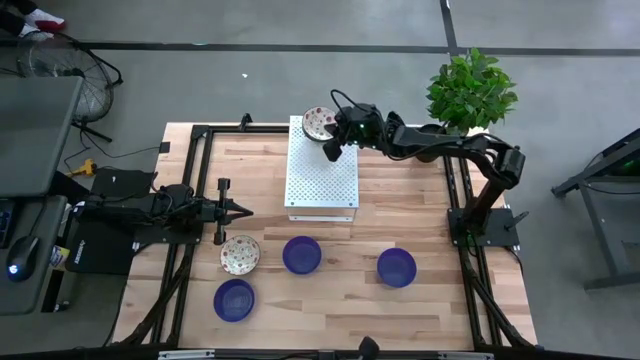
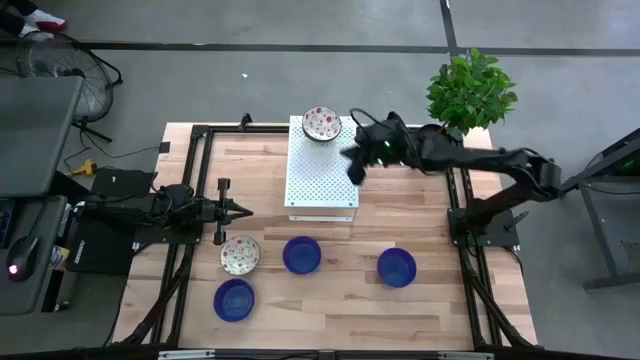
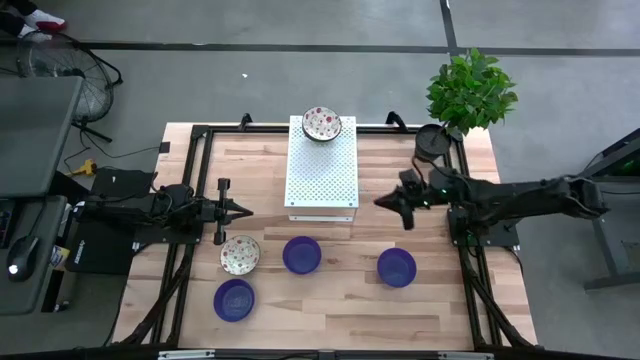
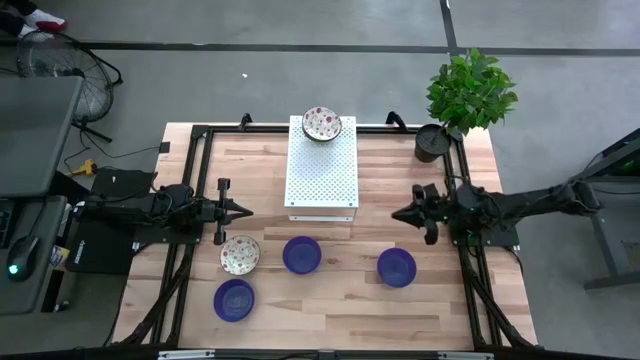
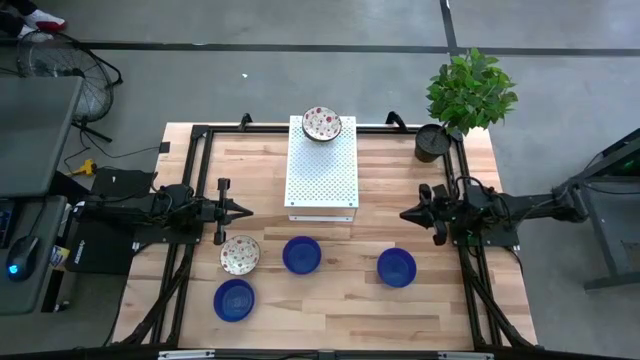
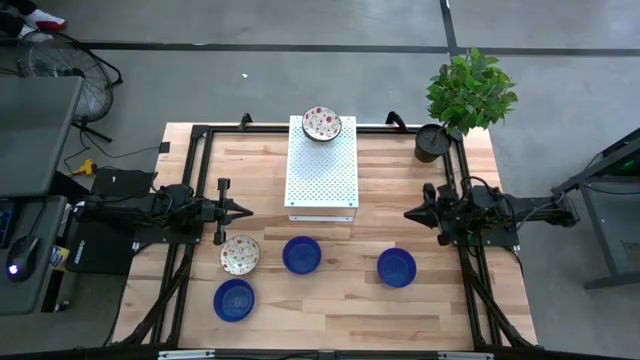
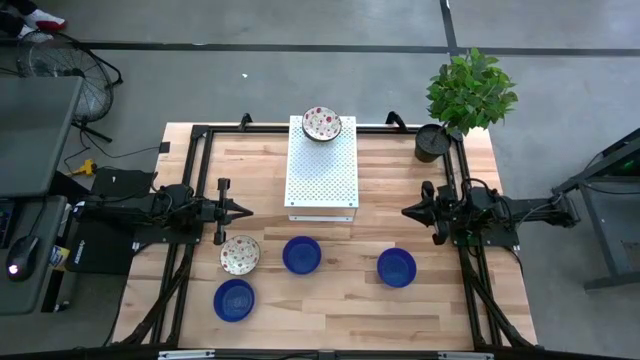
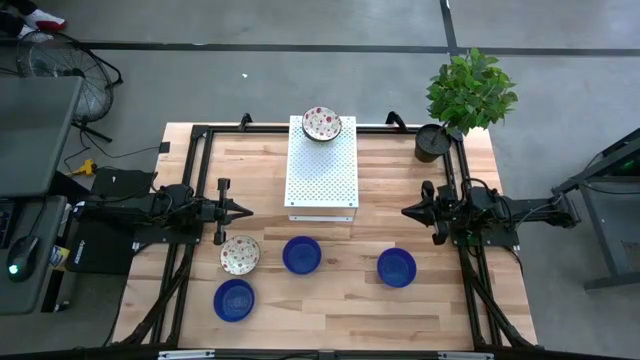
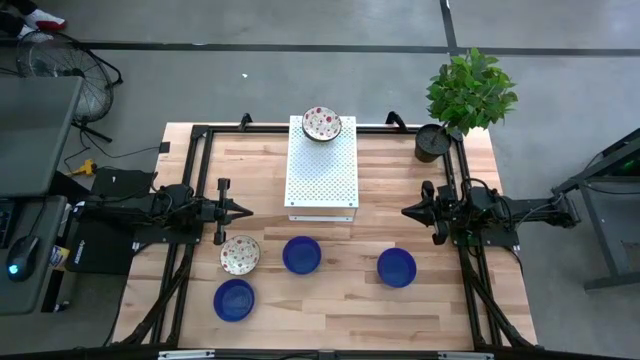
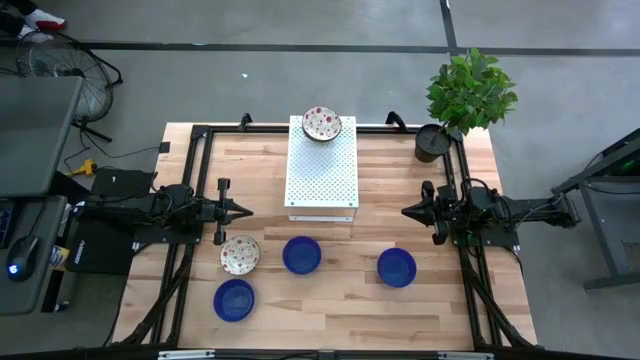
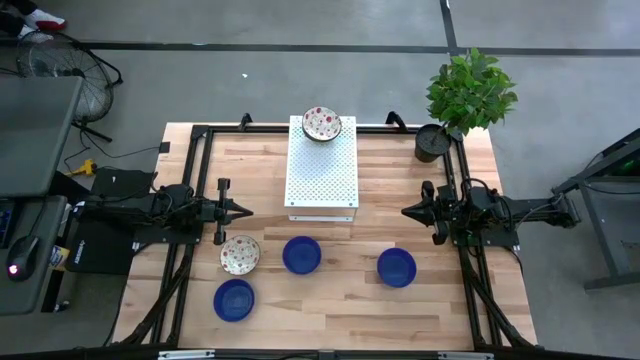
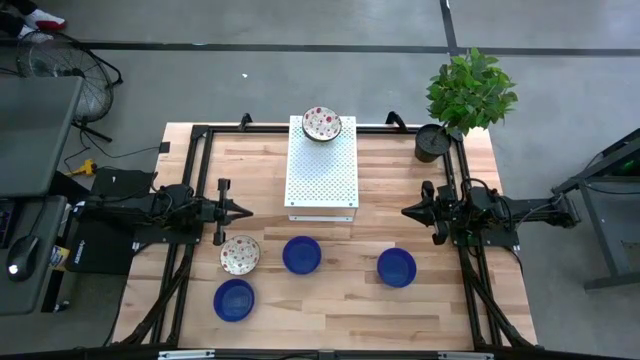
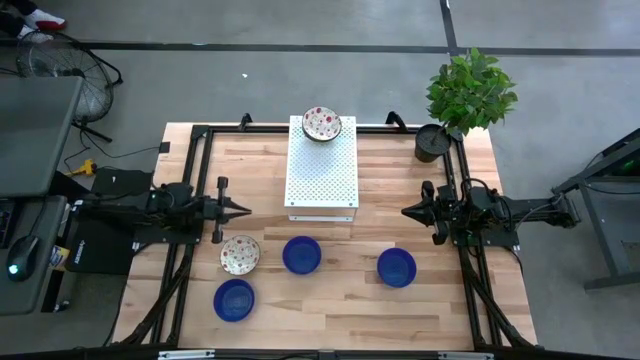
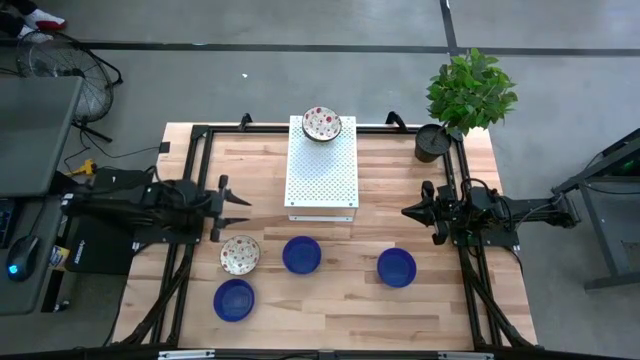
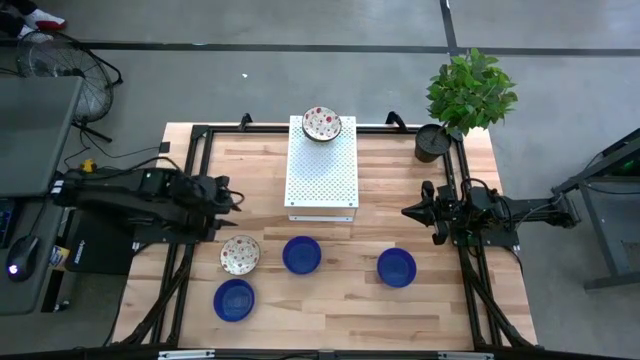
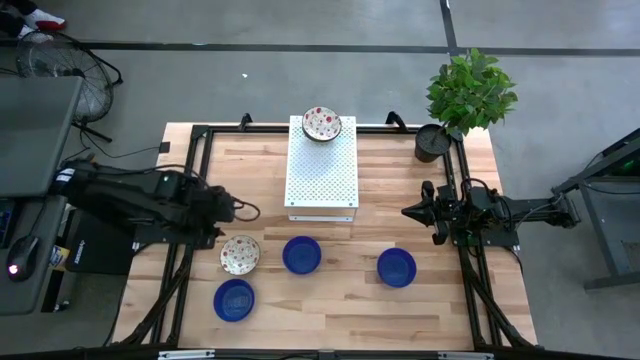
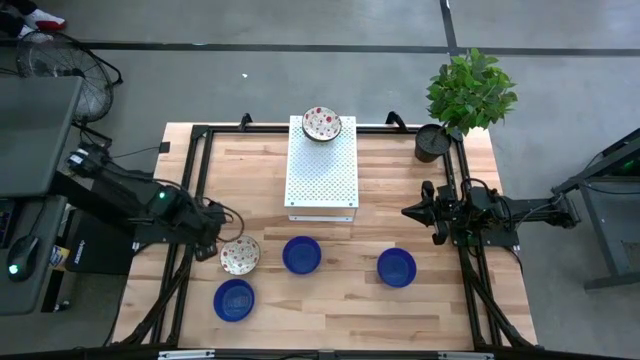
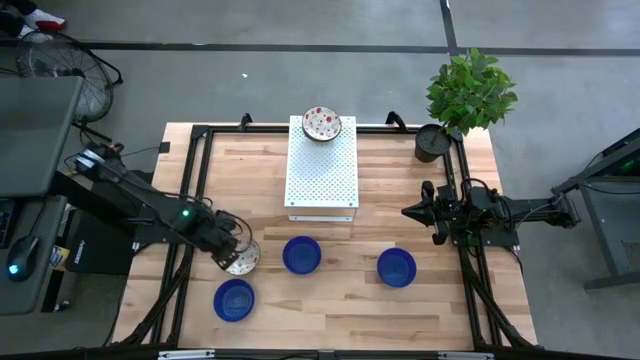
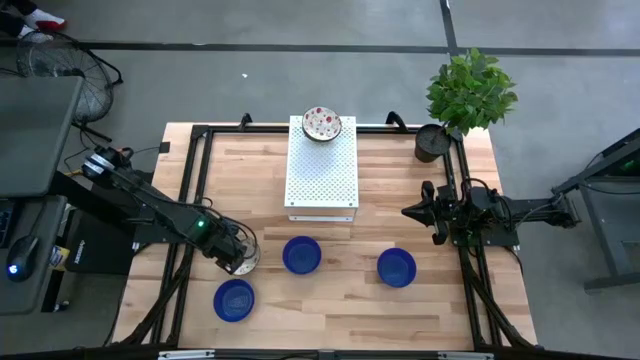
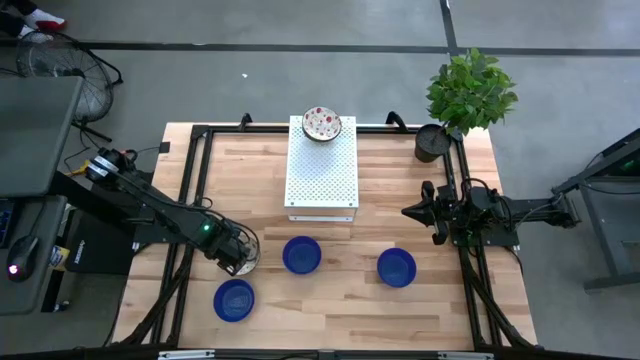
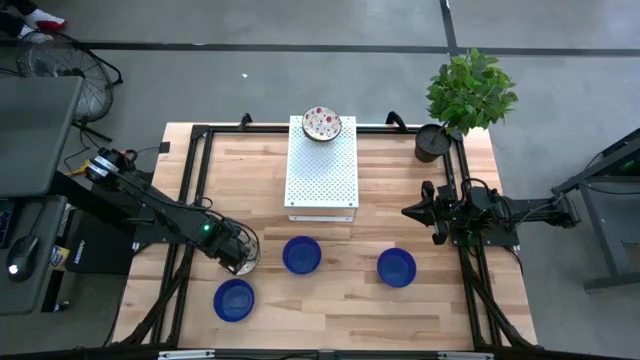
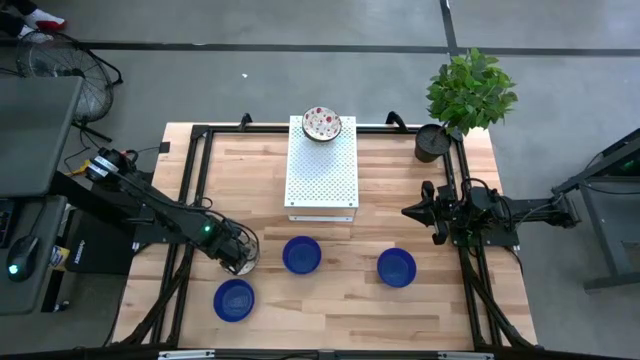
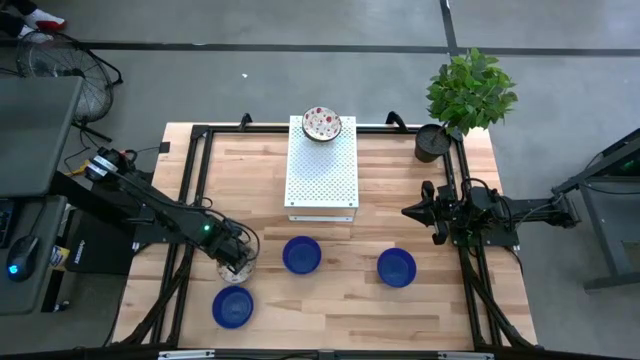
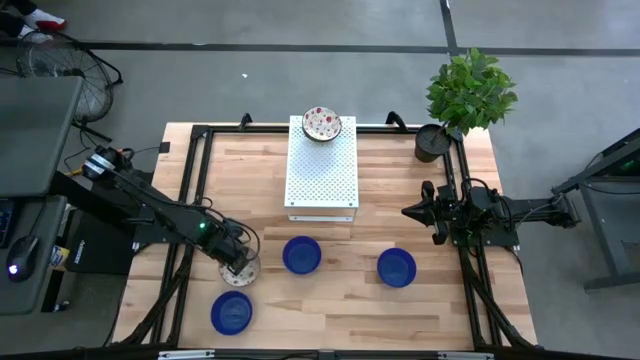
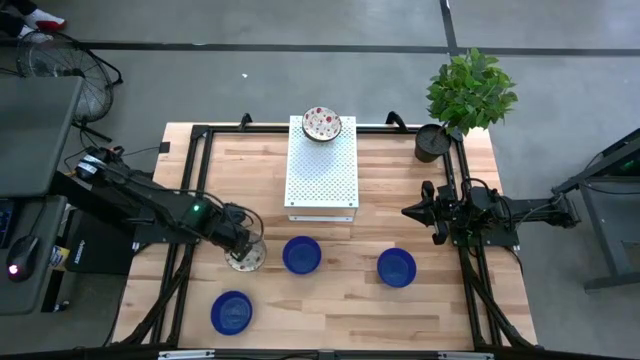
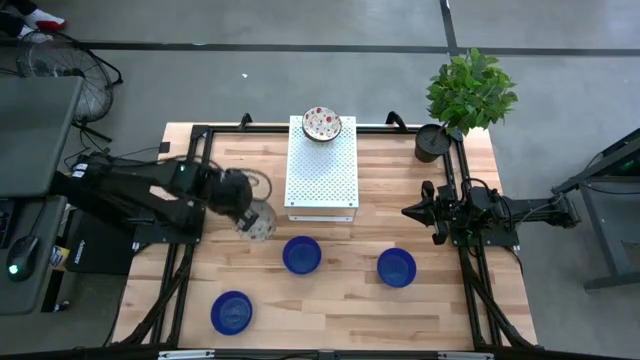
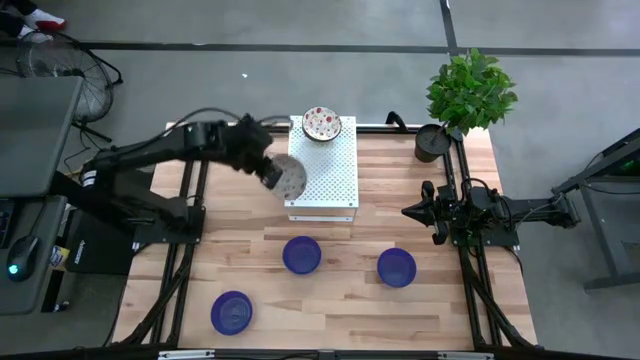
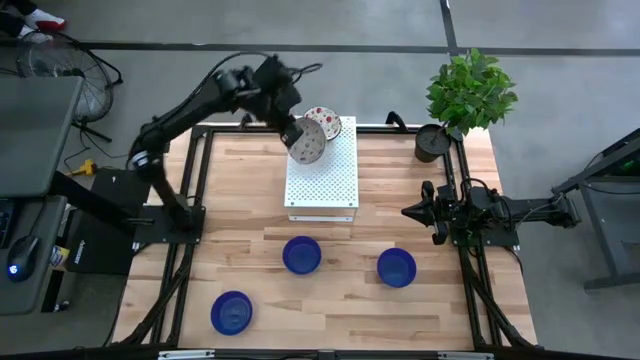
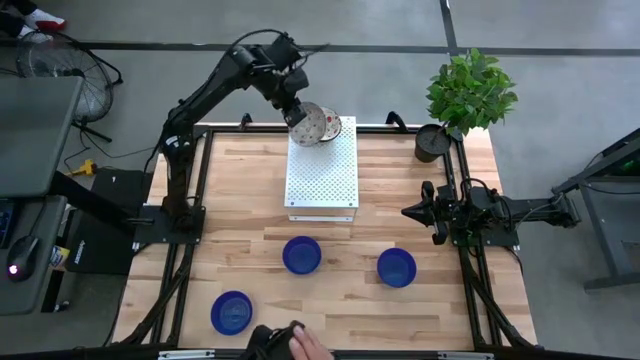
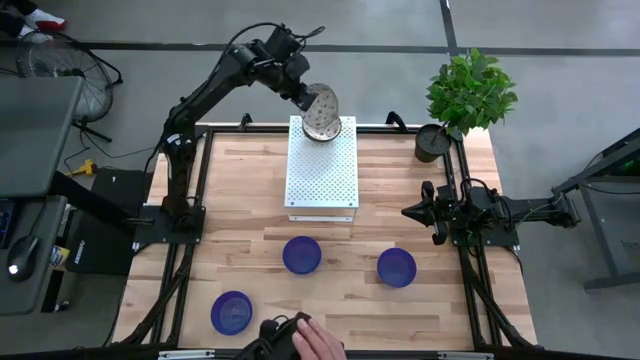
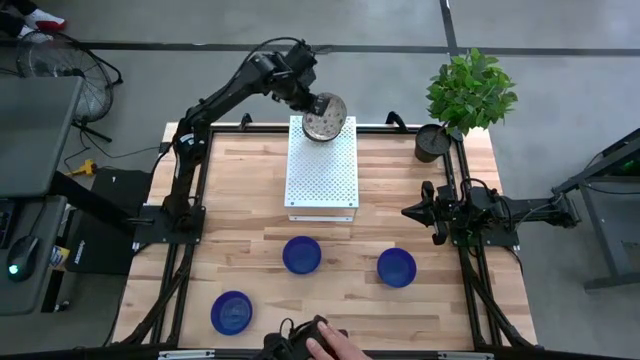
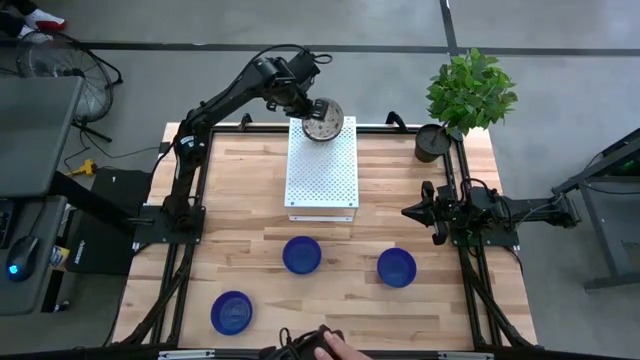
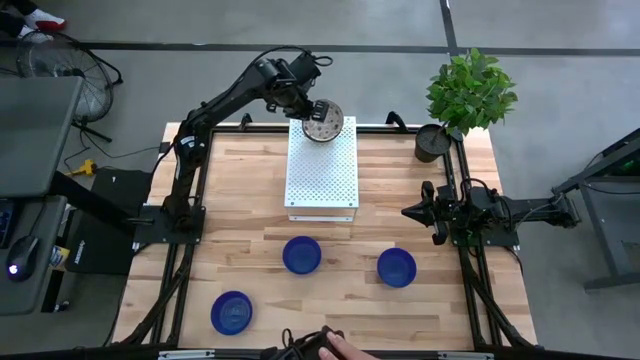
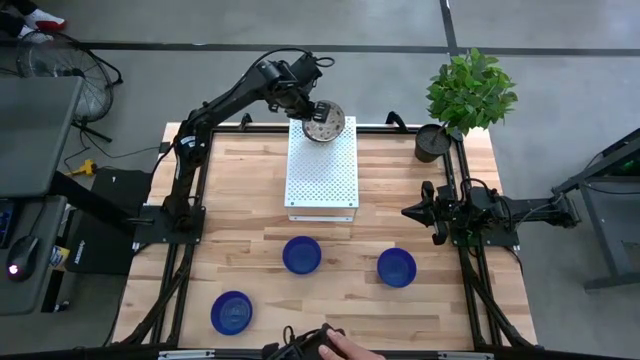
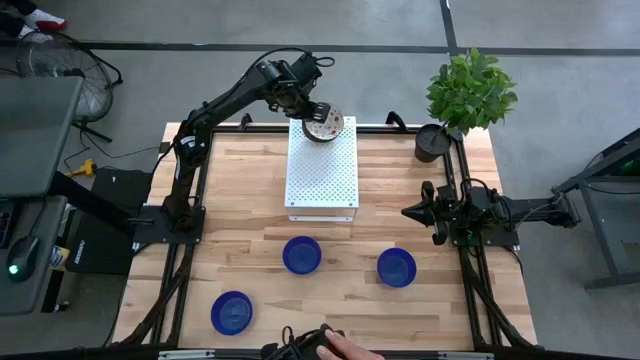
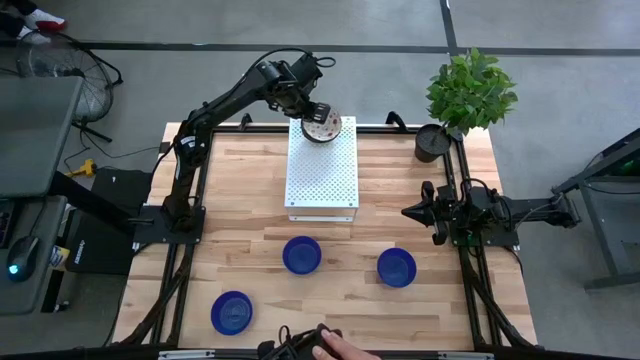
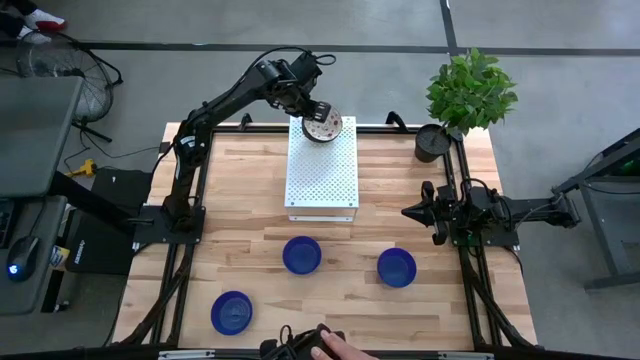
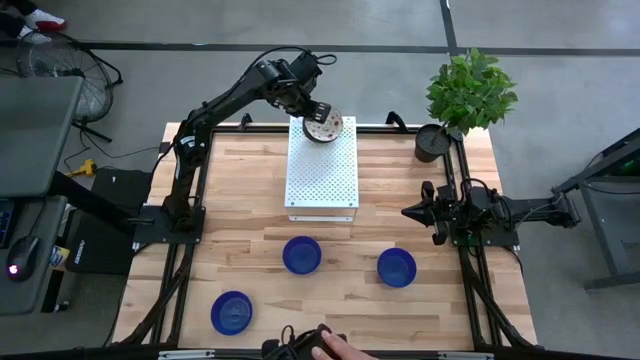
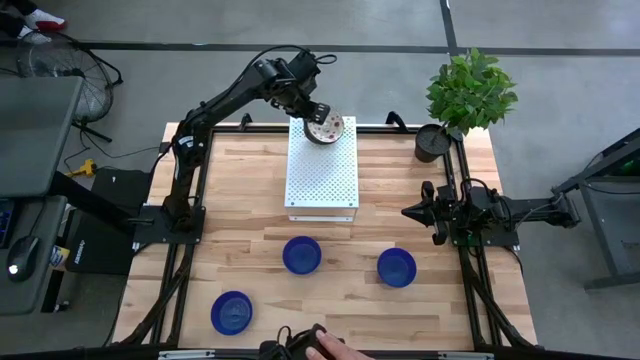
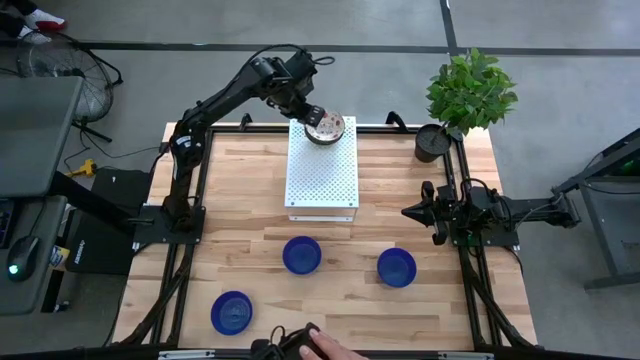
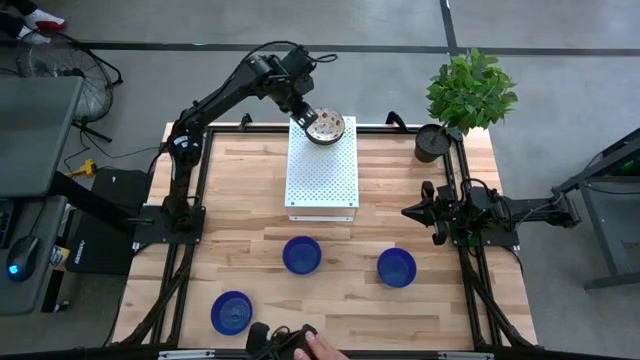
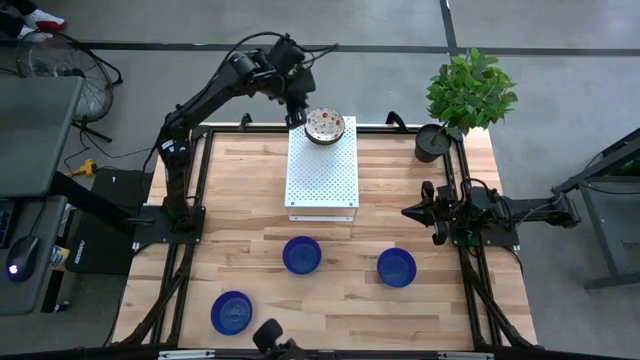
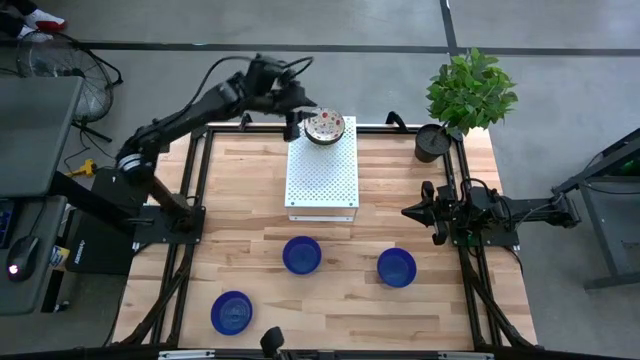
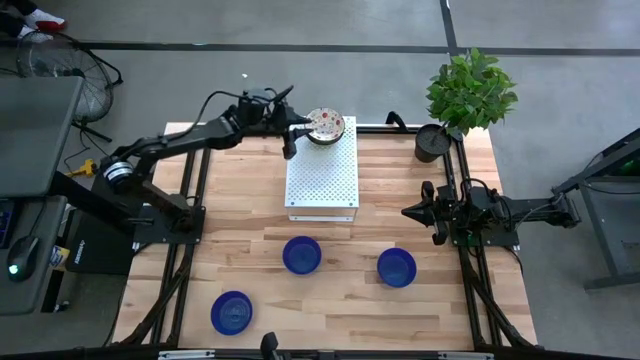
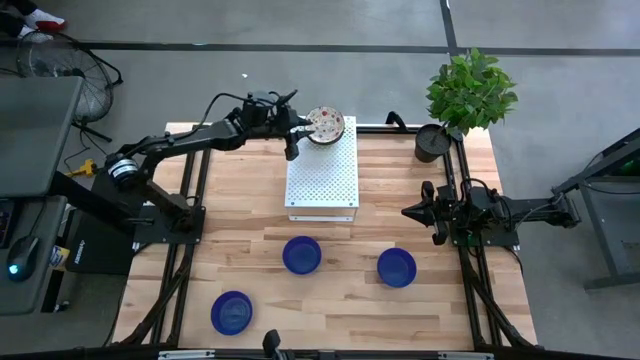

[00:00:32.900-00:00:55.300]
Task: Pick & Place Mini bowls
Stack the green bowl on top of the green bowls on the shelf
